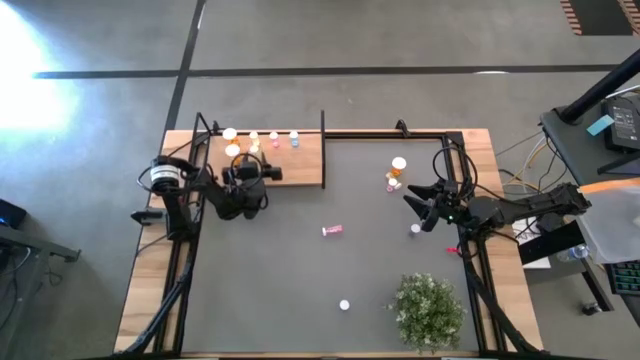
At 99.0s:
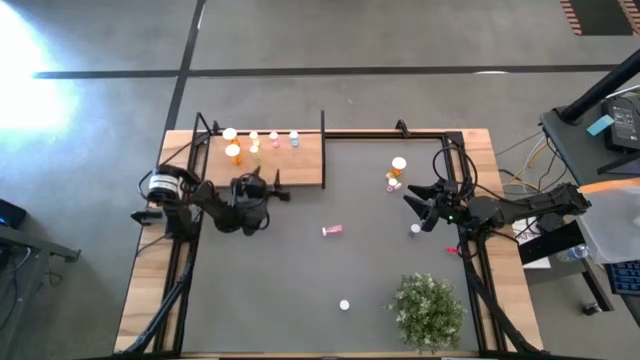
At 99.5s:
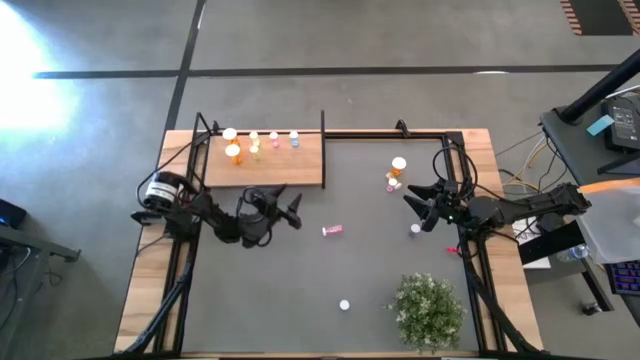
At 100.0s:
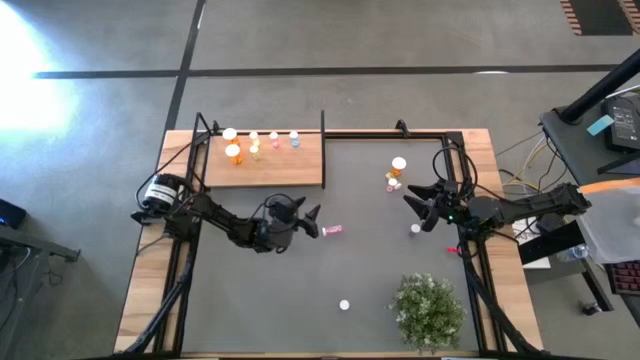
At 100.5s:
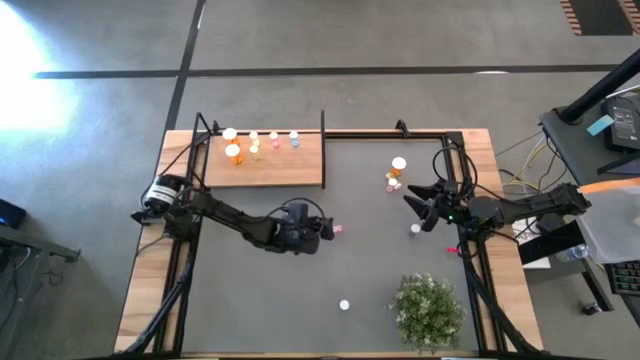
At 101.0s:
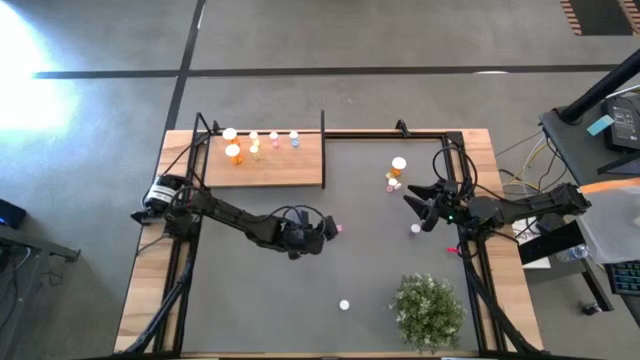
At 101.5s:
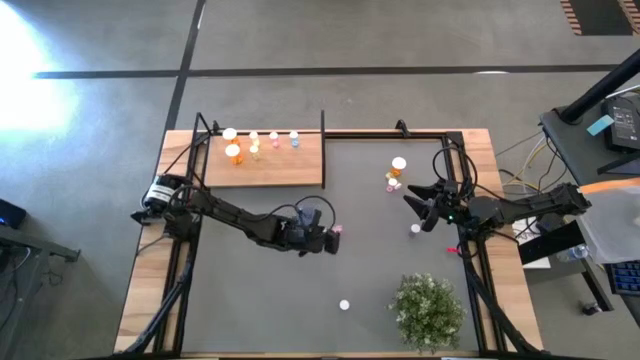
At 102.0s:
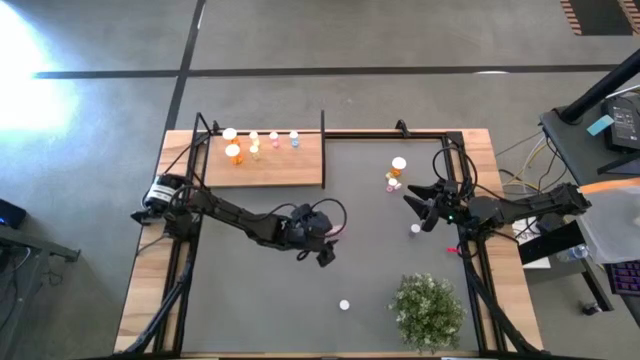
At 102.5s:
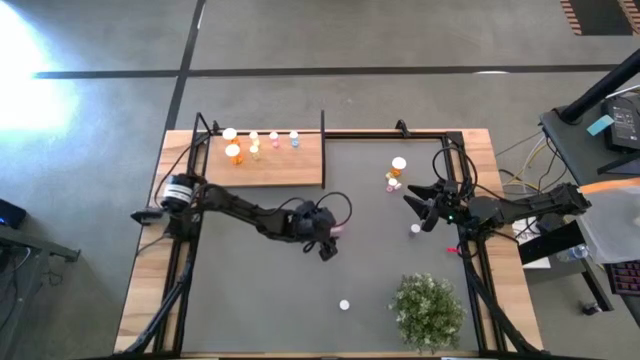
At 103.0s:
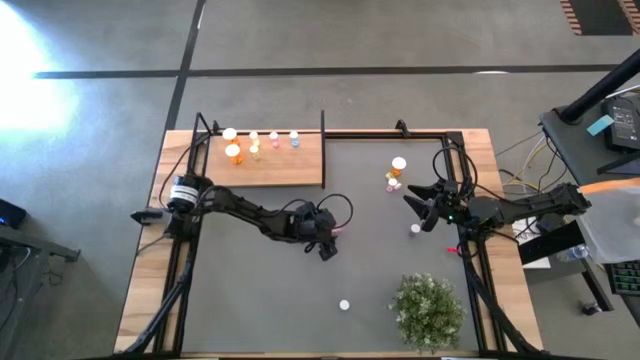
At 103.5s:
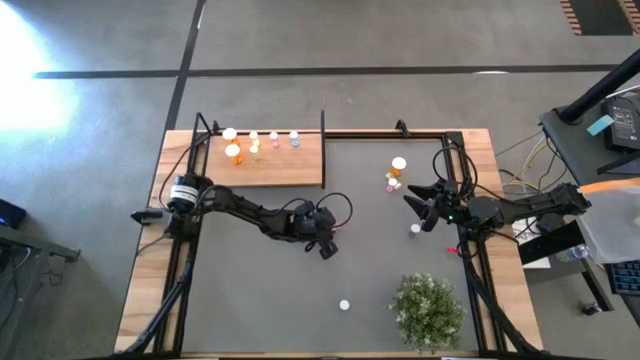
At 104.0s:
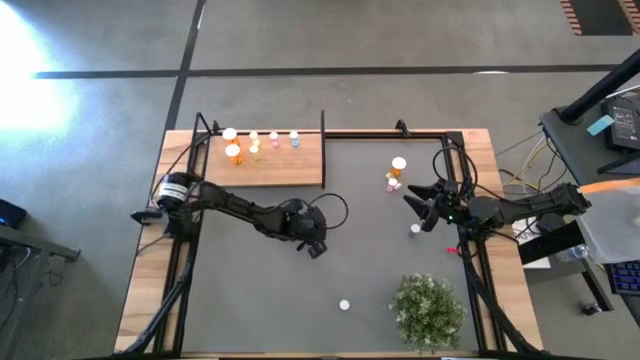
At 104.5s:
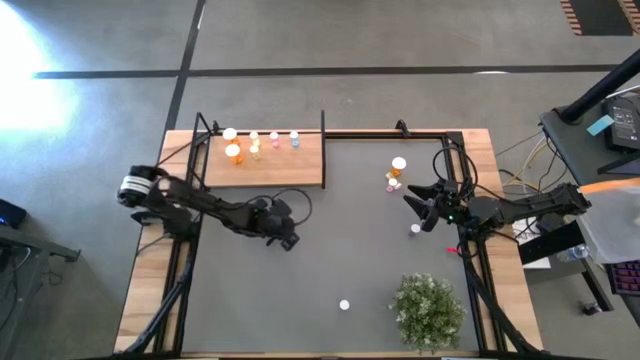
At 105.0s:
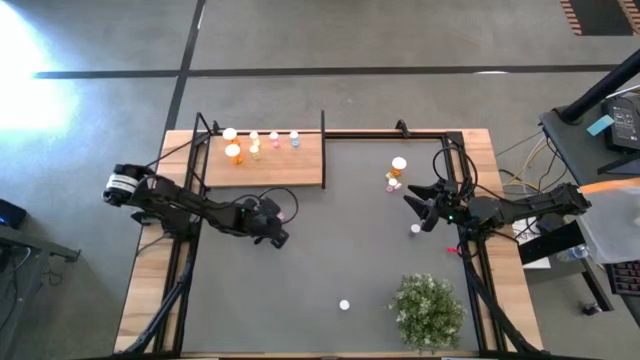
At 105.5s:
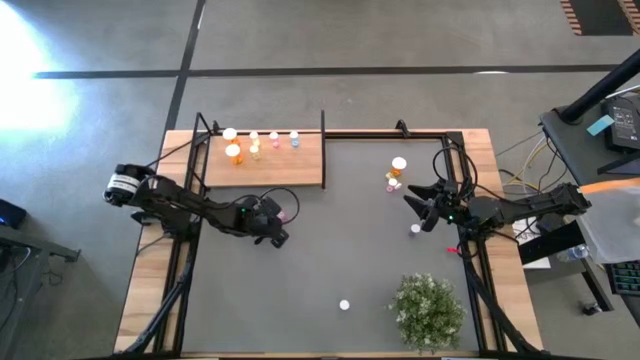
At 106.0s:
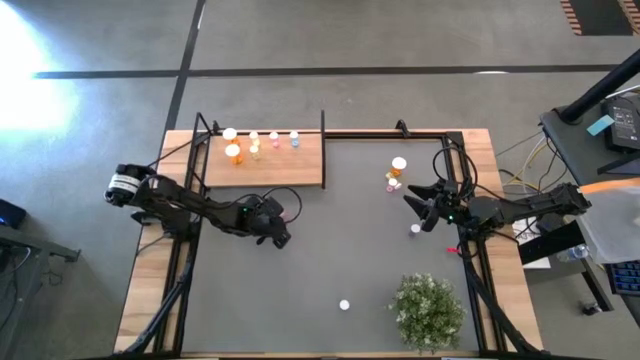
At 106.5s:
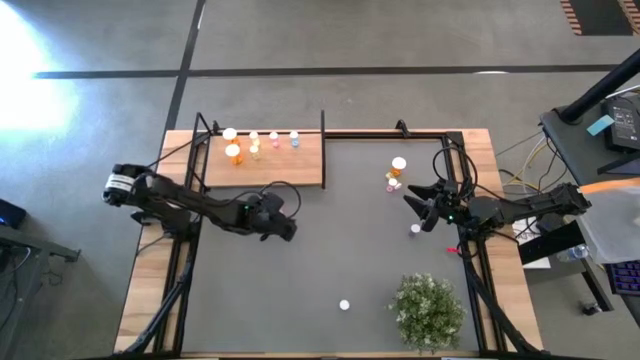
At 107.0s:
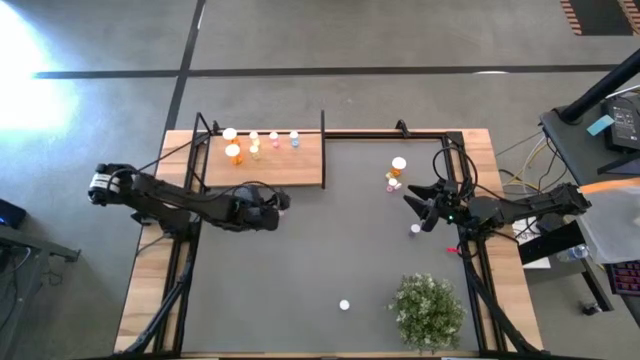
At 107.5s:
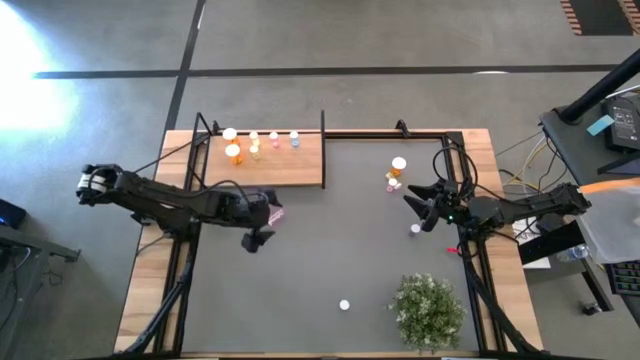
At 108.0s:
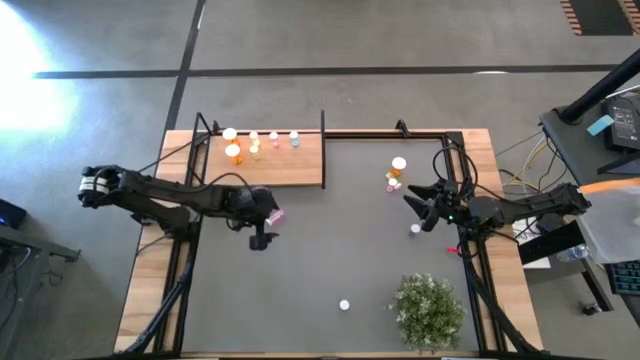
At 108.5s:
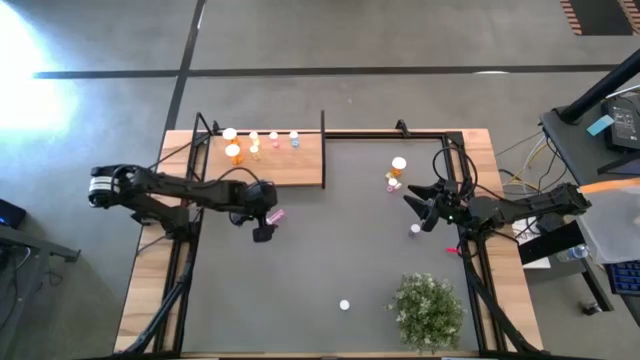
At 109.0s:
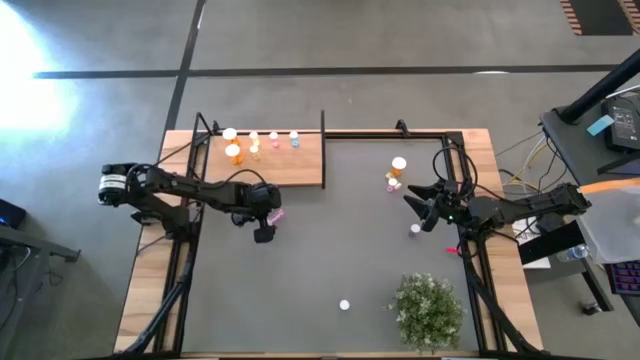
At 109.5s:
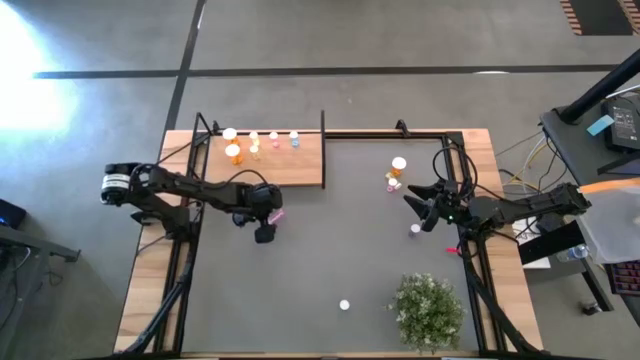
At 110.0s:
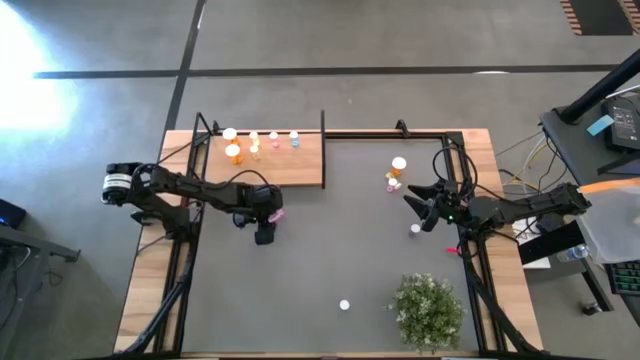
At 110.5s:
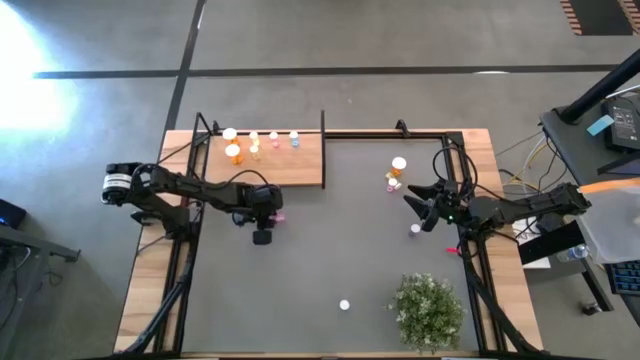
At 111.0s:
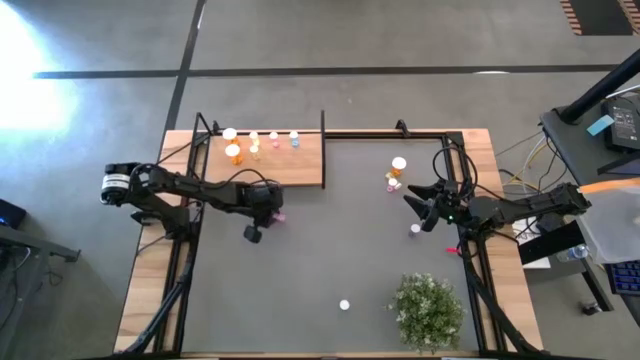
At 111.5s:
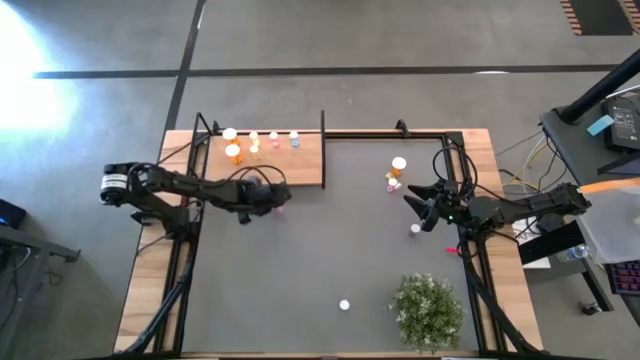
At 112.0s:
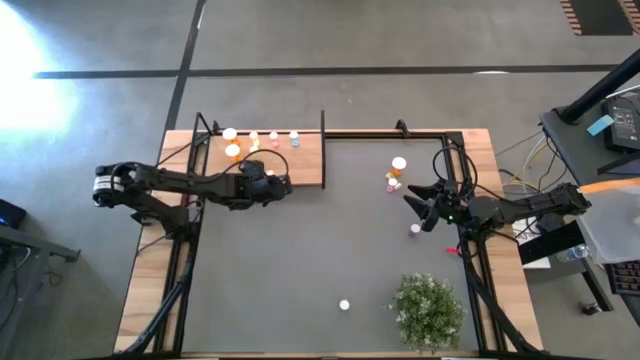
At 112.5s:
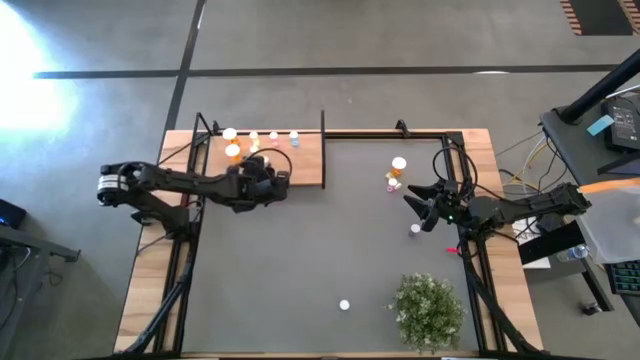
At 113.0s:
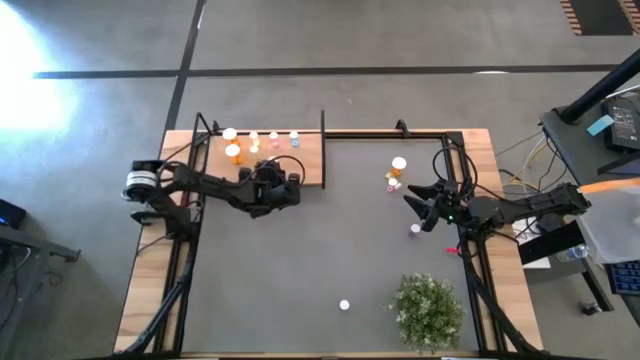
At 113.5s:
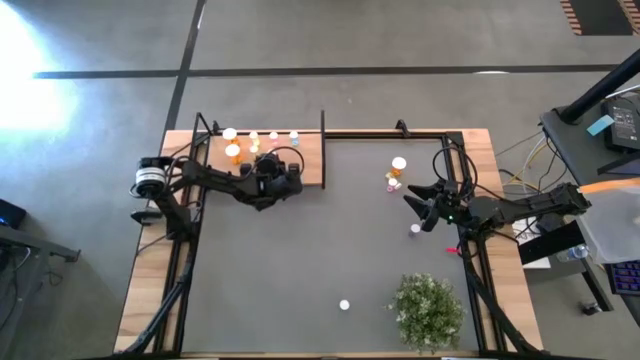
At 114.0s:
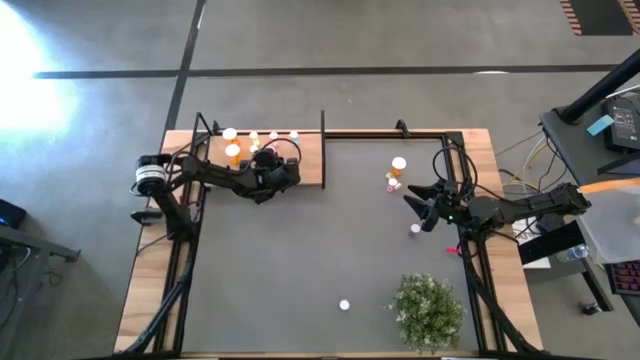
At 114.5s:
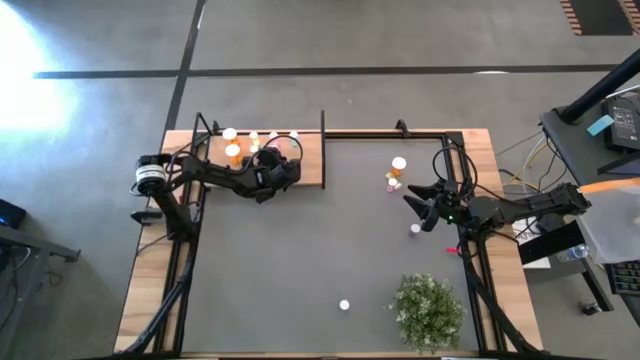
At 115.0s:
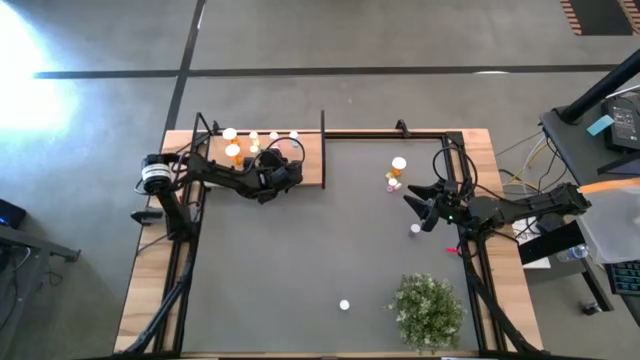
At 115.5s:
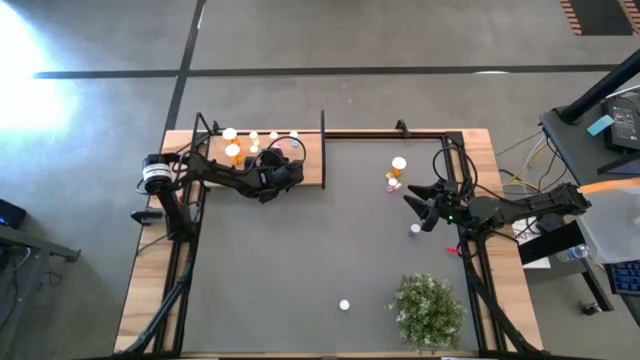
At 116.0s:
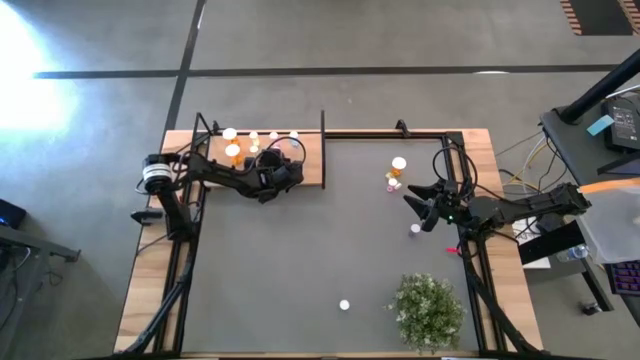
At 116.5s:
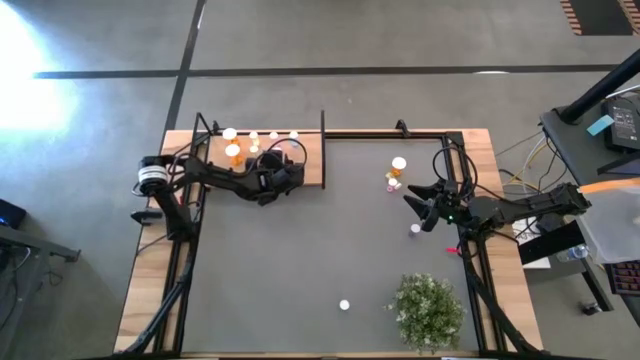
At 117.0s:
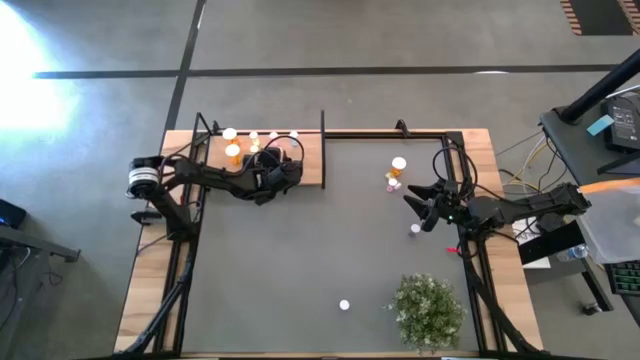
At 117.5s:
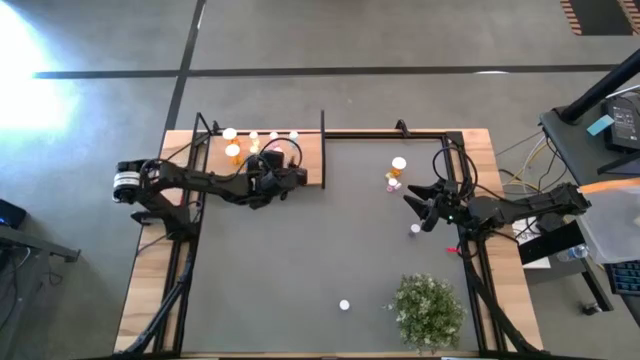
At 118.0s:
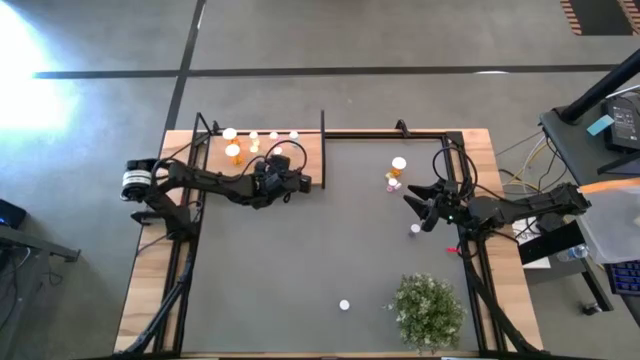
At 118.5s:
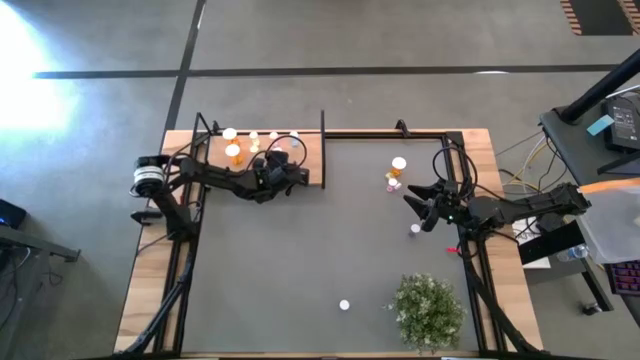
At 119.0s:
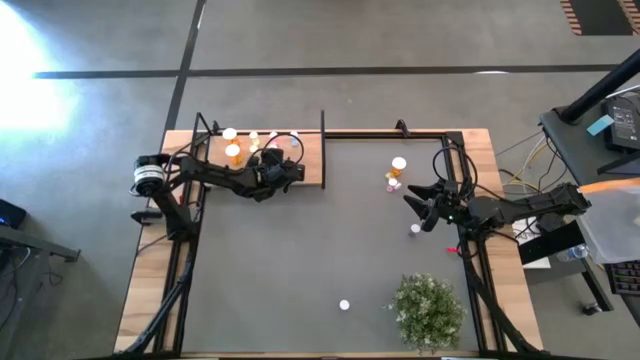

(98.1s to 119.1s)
Task: Pick and place medicine bottles onto shelf by color
Put the bottom pink pill bottle on the shelf aligned with the other pink pill bottle

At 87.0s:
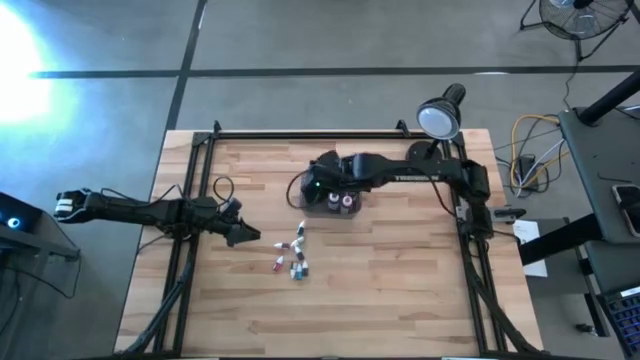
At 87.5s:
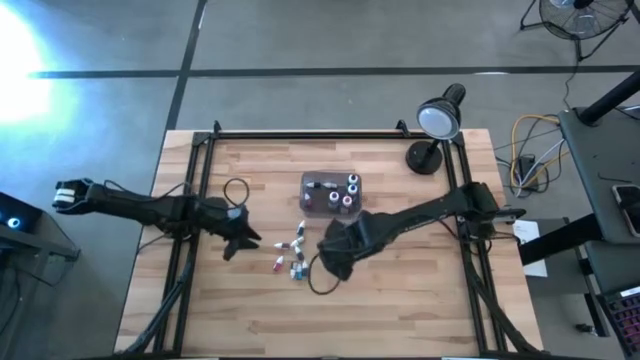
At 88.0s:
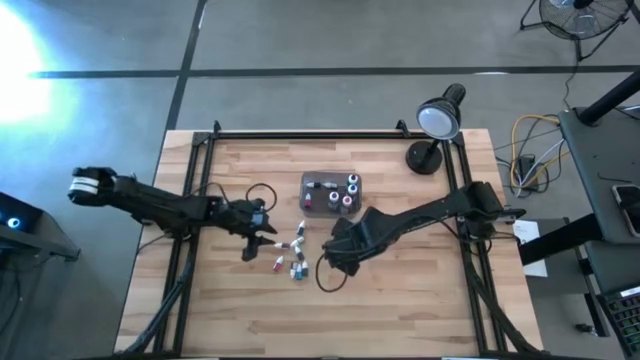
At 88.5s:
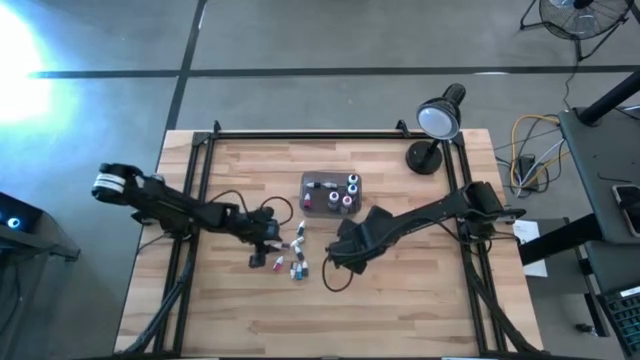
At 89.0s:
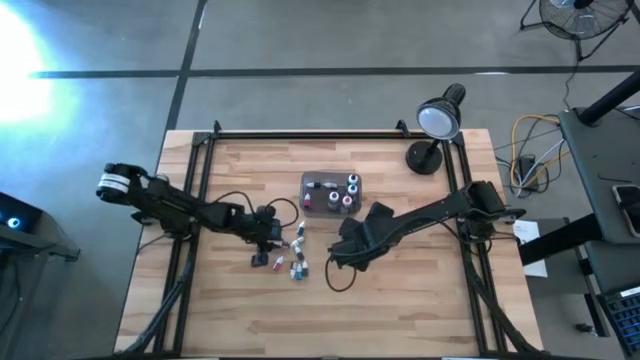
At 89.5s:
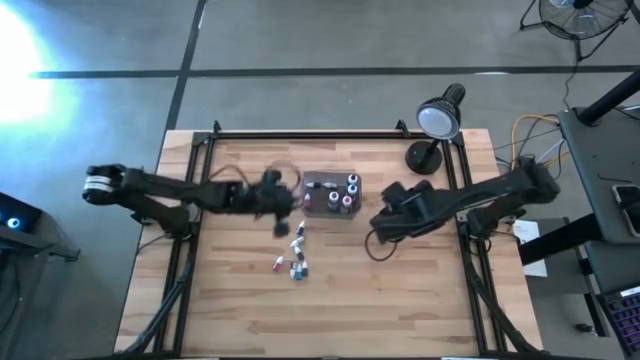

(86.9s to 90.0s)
Task: Pick & Place food coloring
Put the small violet food coloring bottle into the bin
